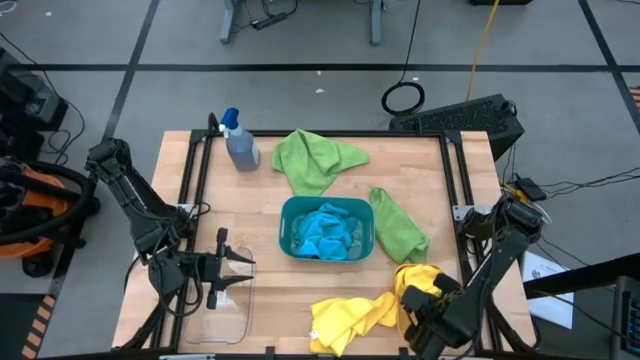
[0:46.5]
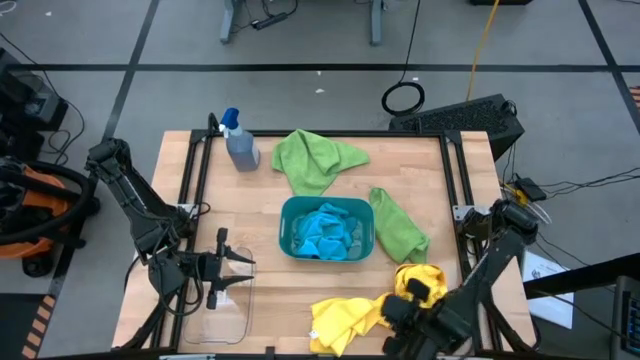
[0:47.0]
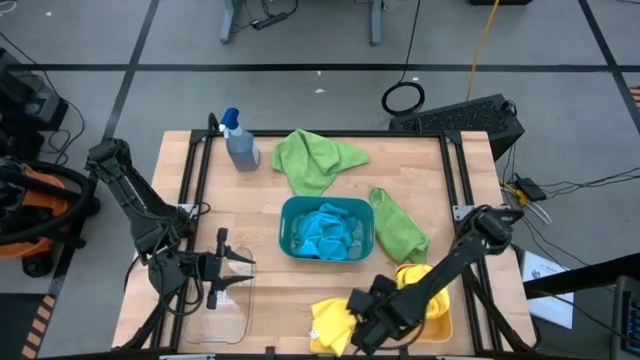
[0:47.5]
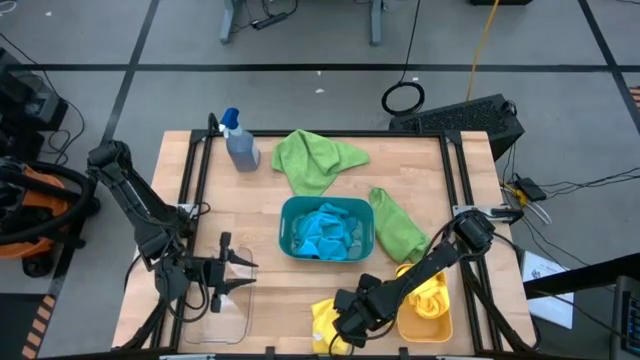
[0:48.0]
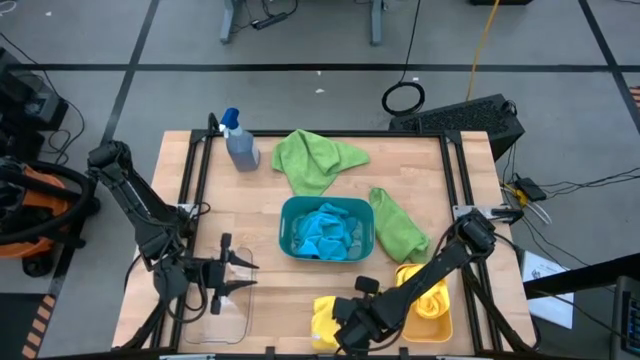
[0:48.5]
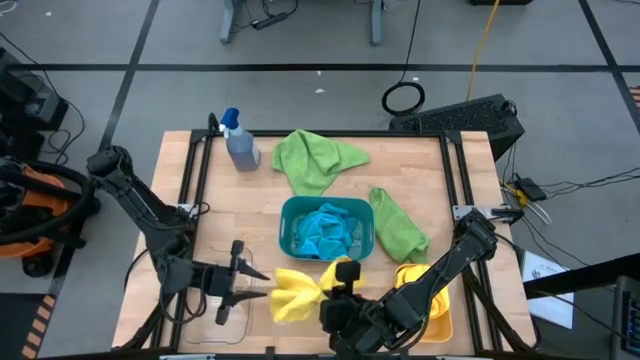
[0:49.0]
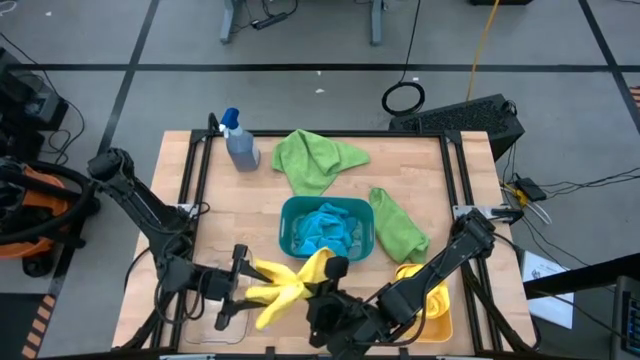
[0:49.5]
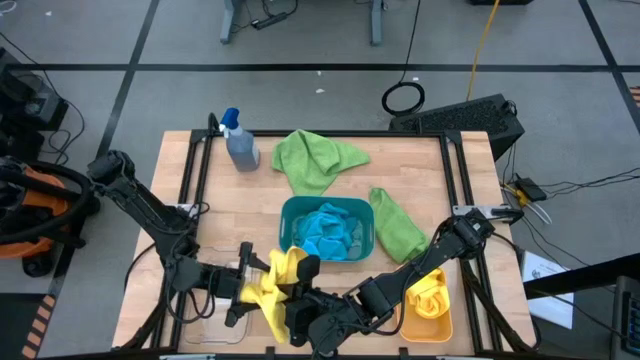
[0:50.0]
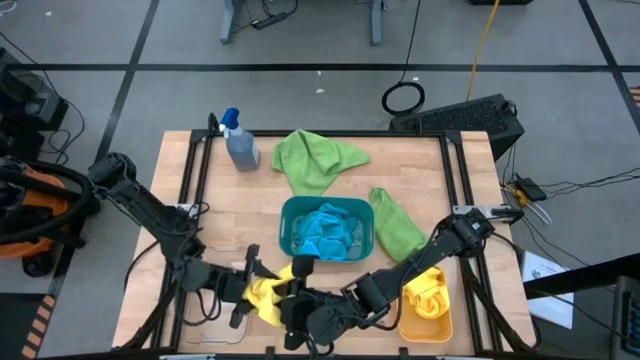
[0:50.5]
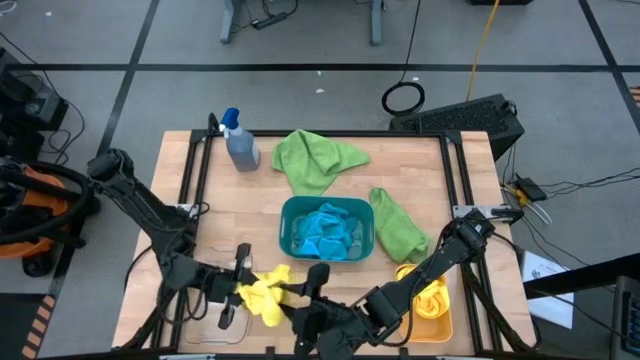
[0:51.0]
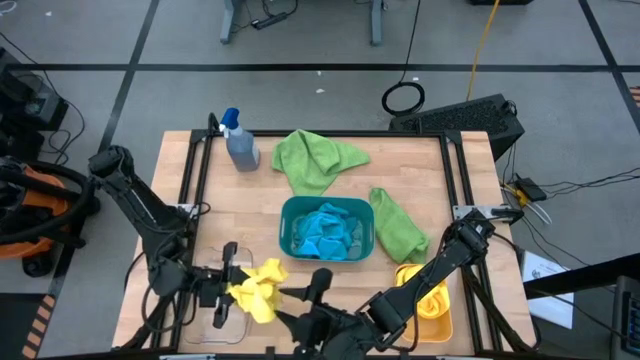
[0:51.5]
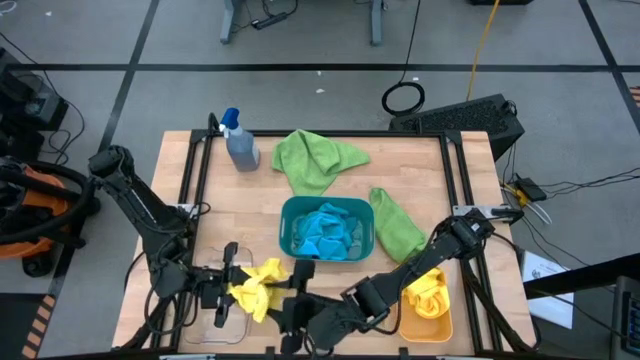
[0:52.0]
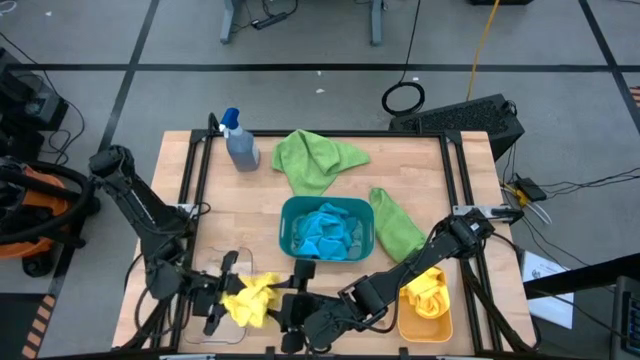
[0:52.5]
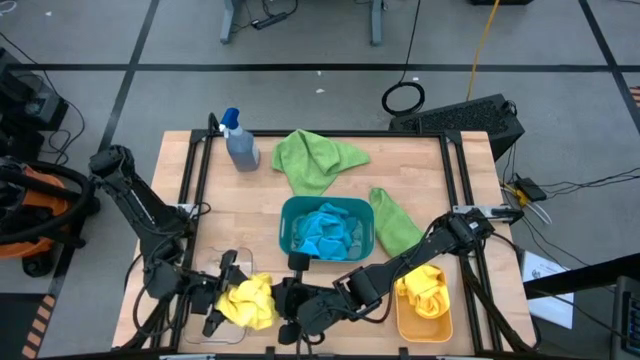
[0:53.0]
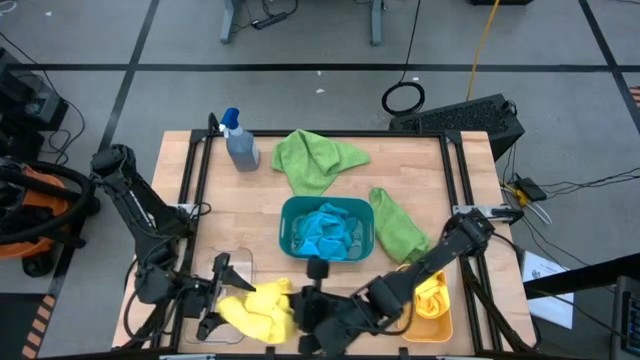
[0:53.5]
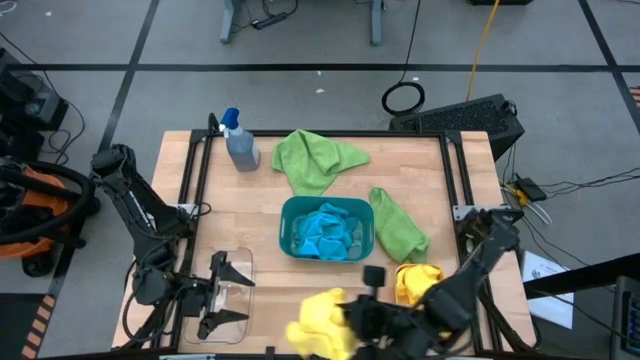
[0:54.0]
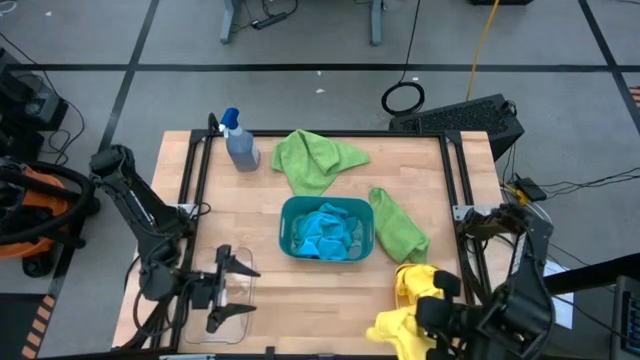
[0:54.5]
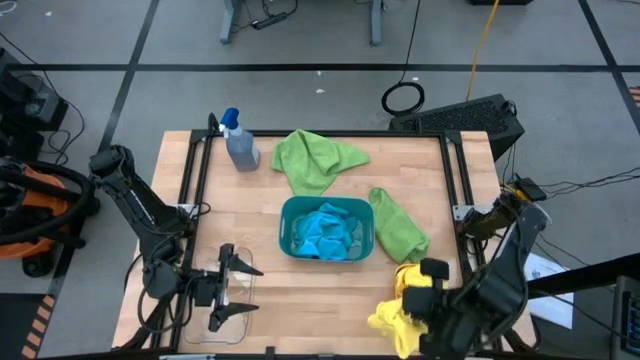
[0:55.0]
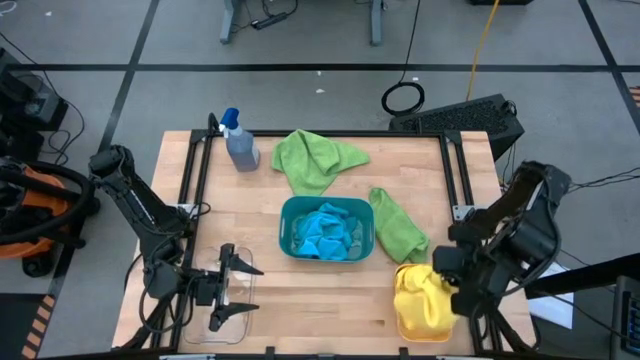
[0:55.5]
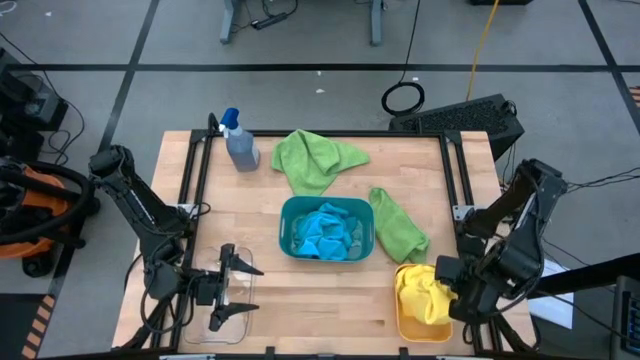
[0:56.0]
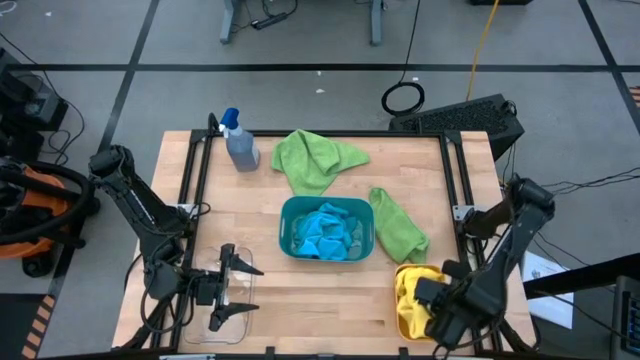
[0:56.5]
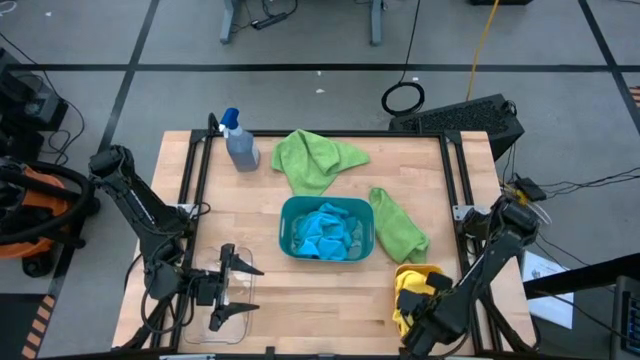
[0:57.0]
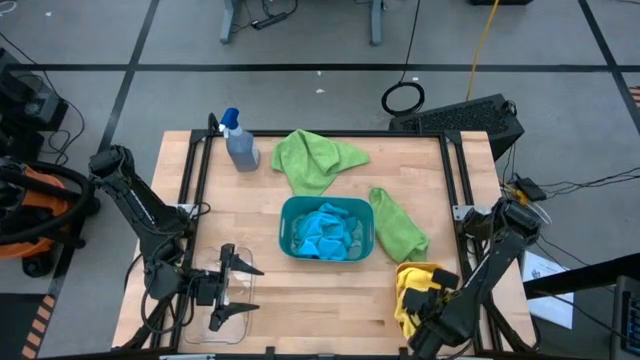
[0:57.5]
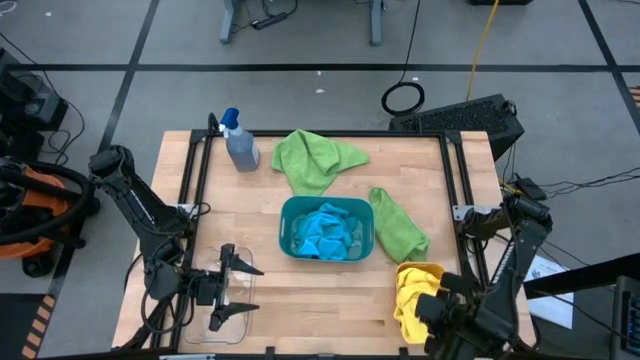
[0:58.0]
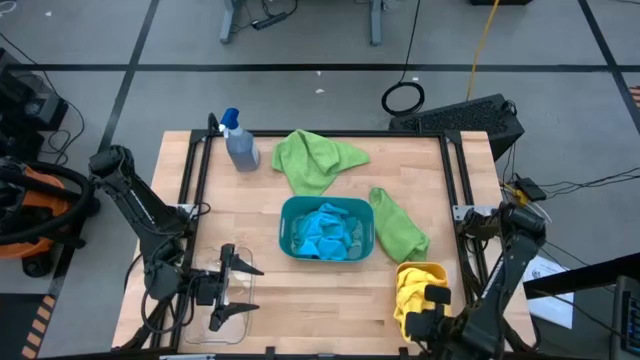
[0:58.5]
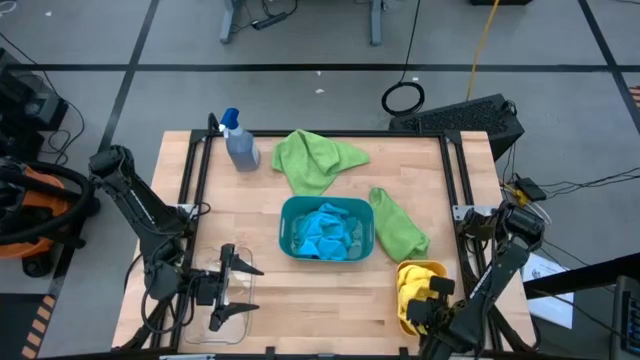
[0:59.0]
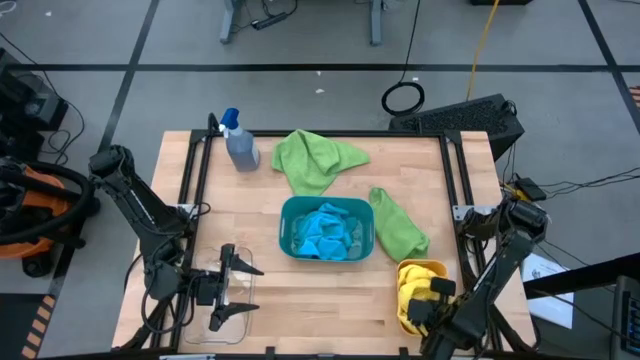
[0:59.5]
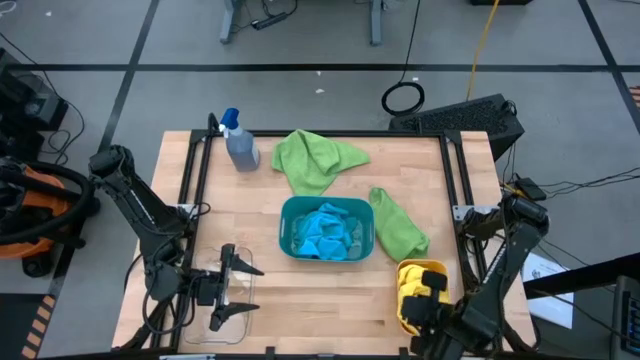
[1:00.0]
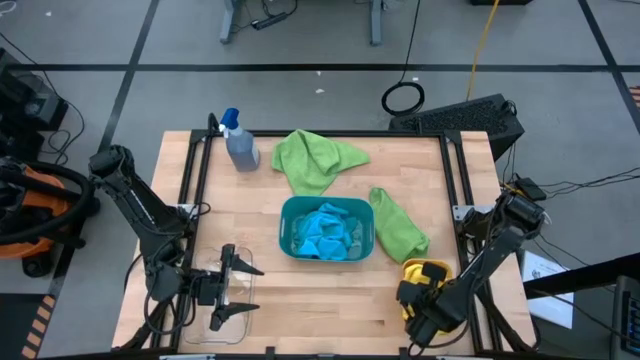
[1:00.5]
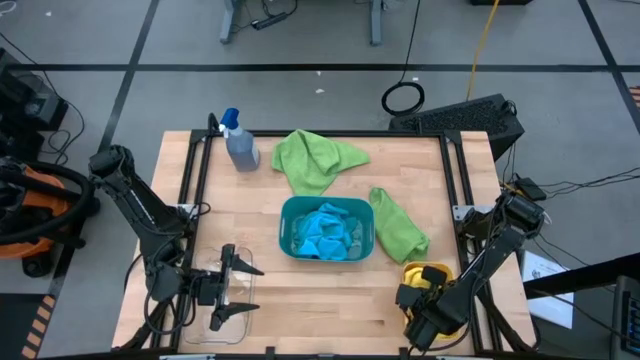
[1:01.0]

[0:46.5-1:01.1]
Task: Sort microfiber towel by color & place in baskets
Put the yellow microfiber towel into the orange bin

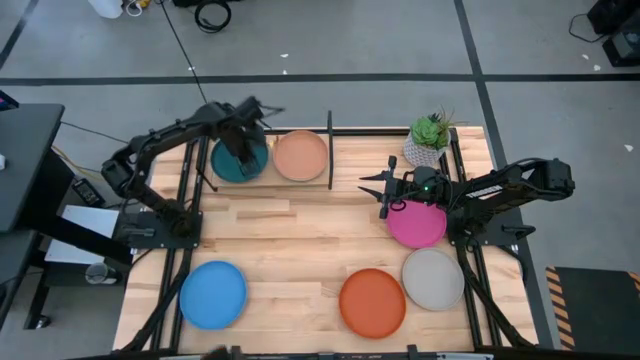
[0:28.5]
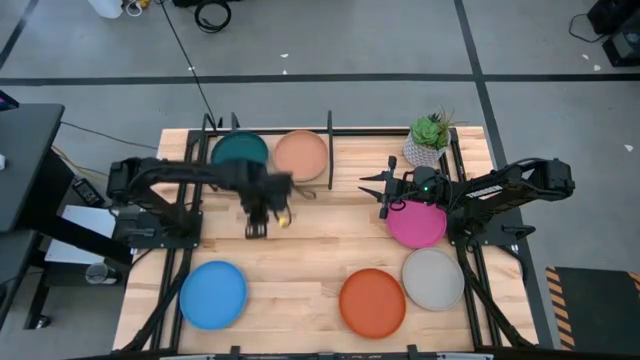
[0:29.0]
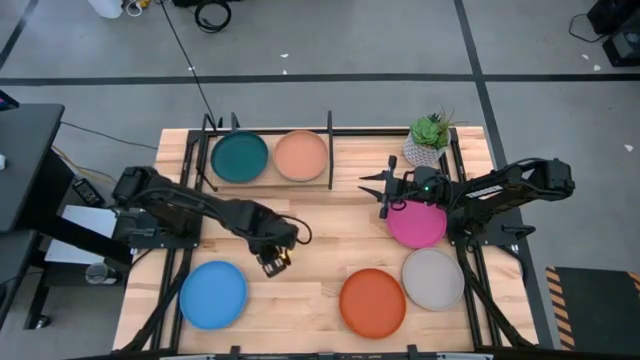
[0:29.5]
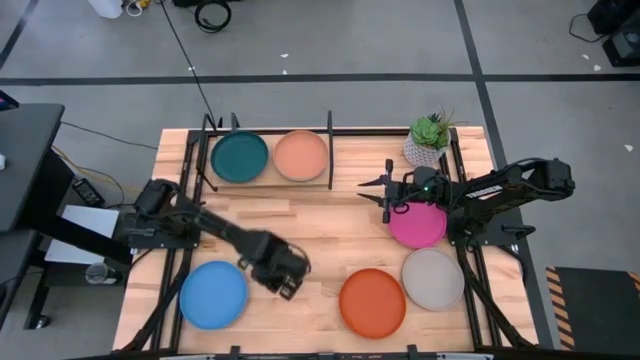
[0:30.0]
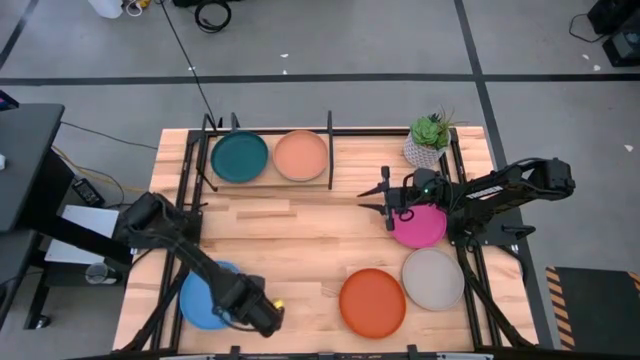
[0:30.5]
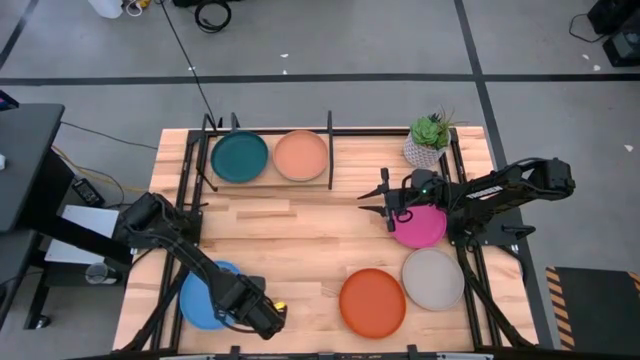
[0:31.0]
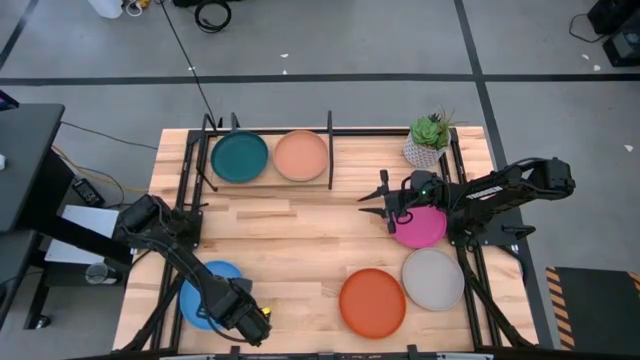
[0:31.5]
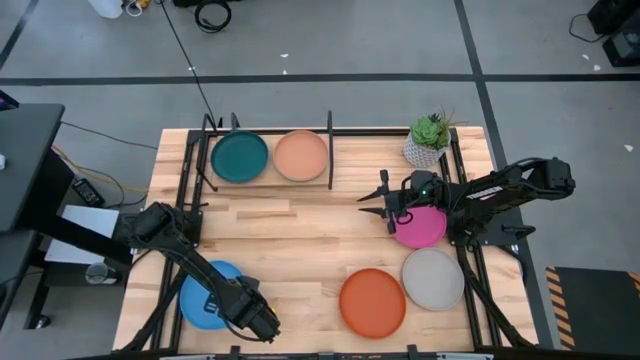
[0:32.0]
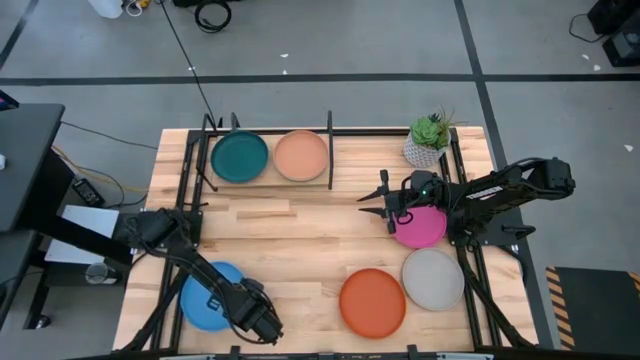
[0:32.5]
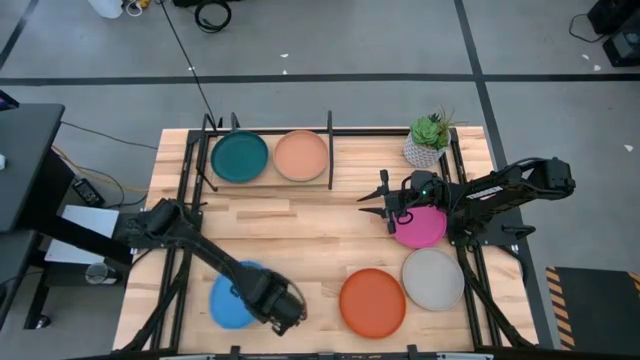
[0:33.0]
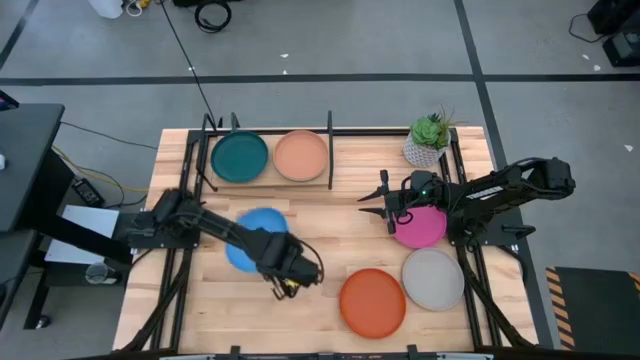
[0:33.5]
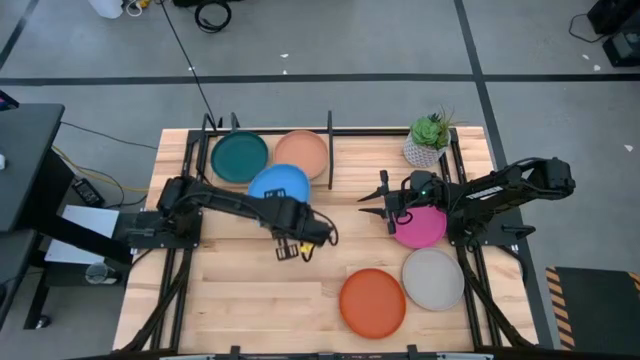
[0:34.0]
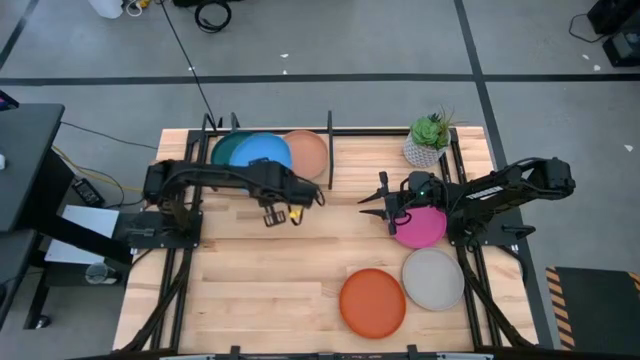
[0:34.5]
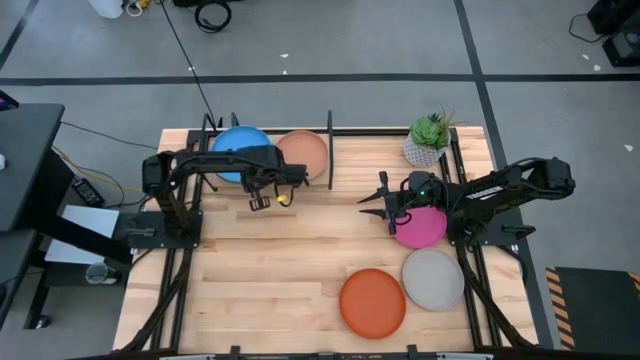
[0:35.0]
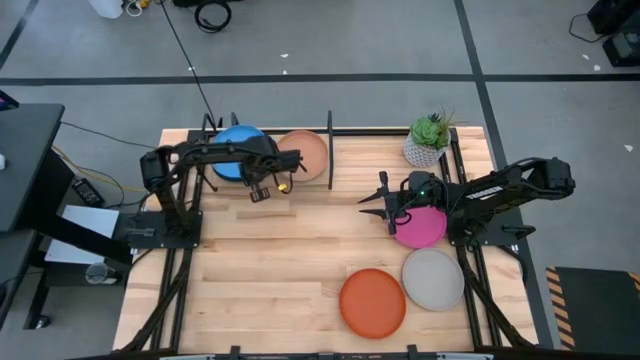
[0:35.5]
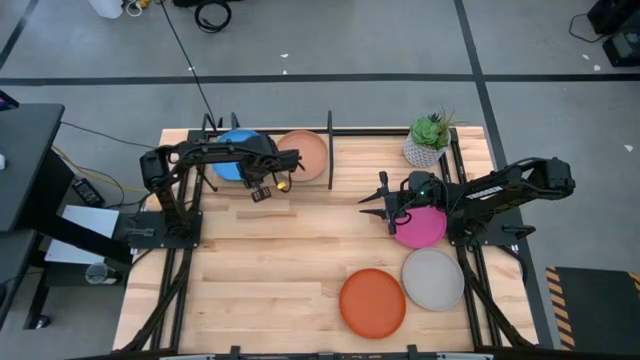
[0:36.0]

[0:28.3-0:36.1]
Task: Place and stack plates onto a shelf
Stack the light blue plate on top of the dark blue plate on the shelf
